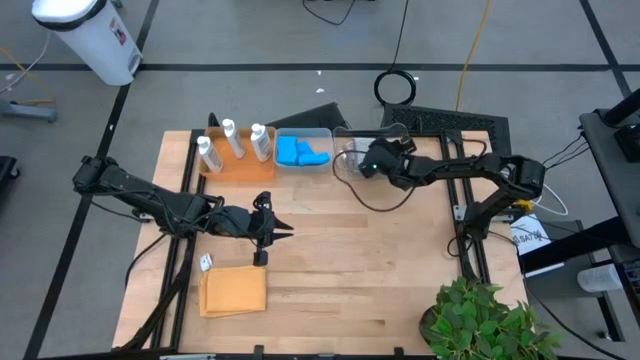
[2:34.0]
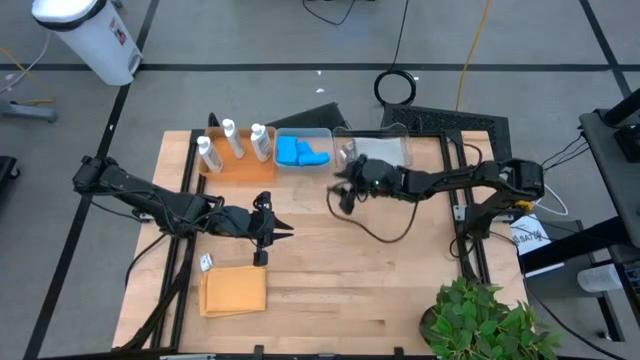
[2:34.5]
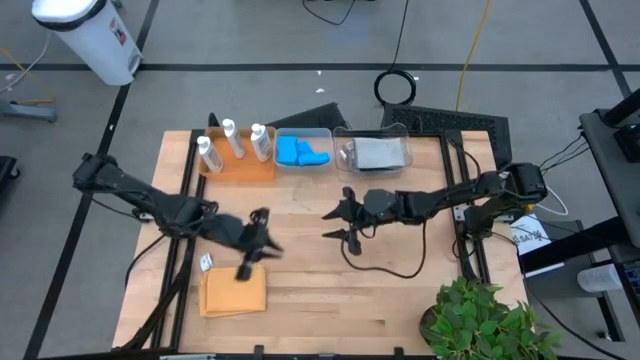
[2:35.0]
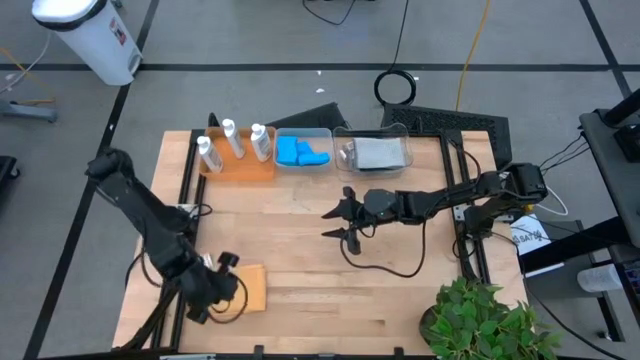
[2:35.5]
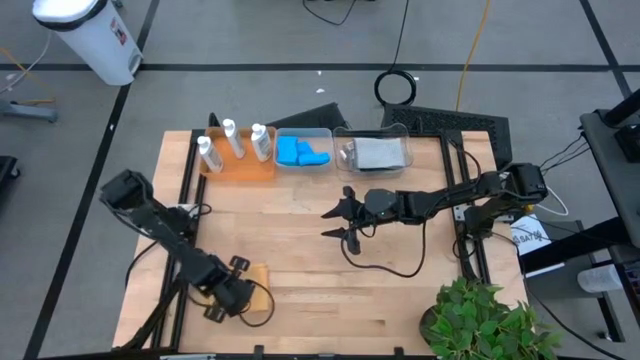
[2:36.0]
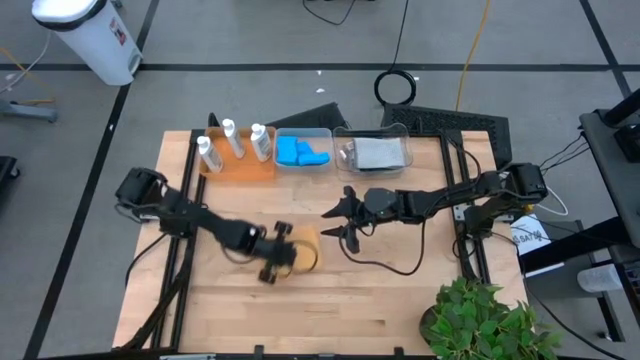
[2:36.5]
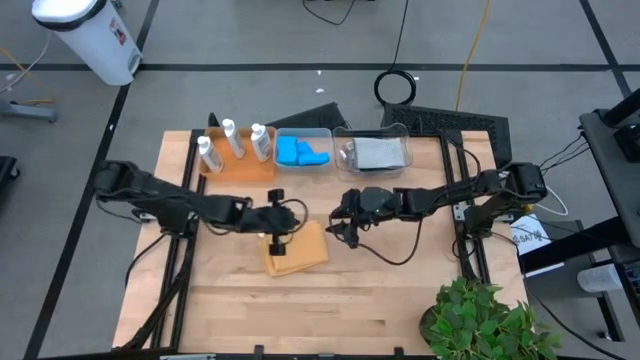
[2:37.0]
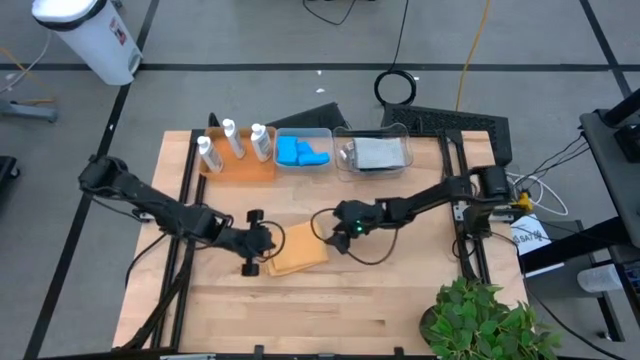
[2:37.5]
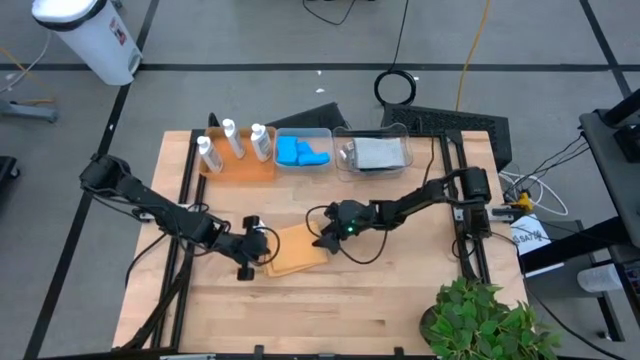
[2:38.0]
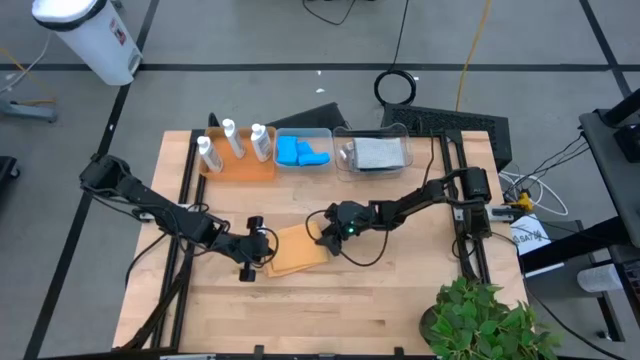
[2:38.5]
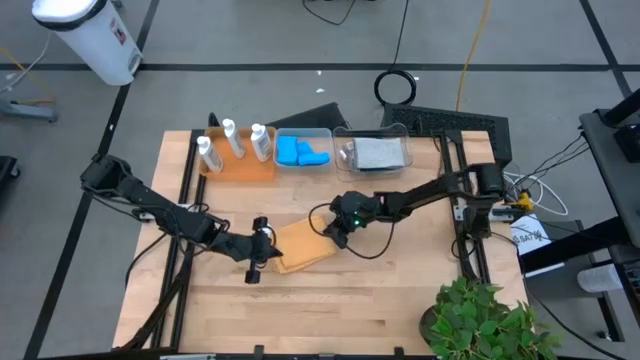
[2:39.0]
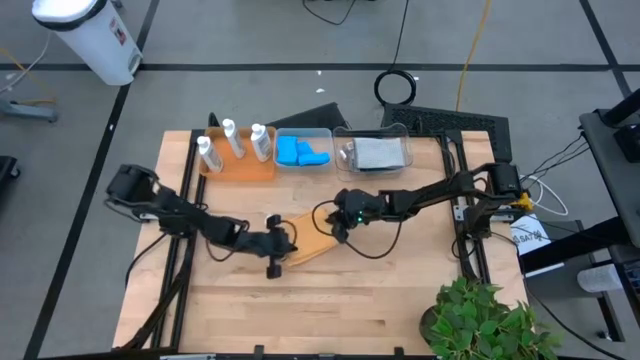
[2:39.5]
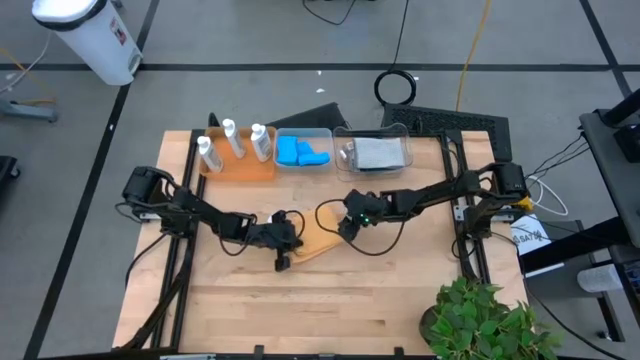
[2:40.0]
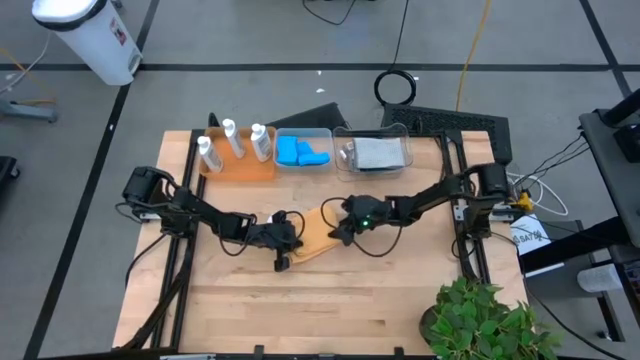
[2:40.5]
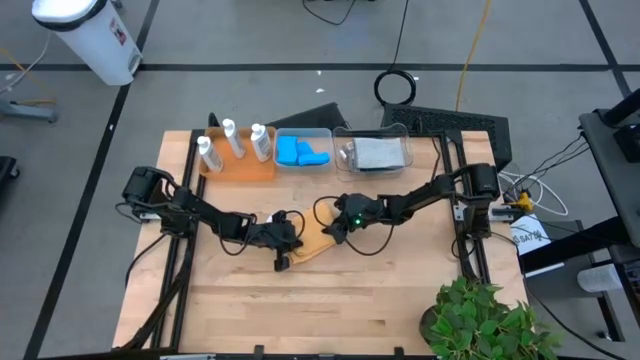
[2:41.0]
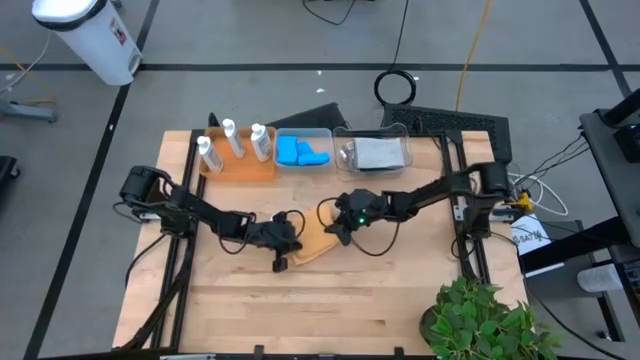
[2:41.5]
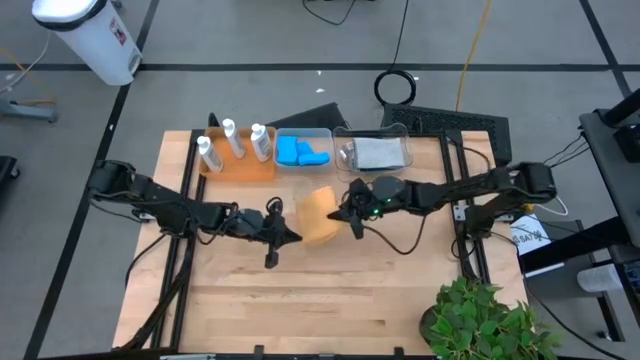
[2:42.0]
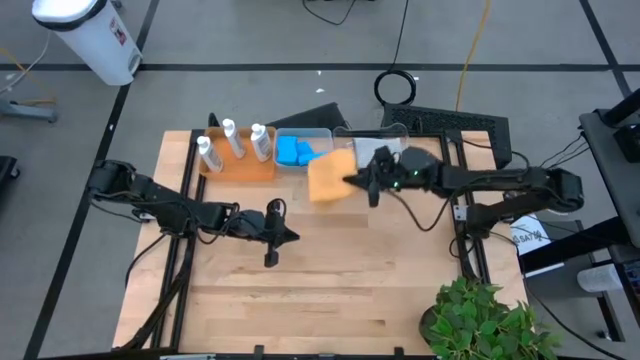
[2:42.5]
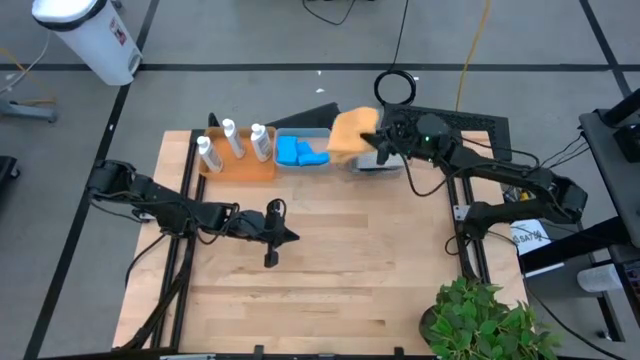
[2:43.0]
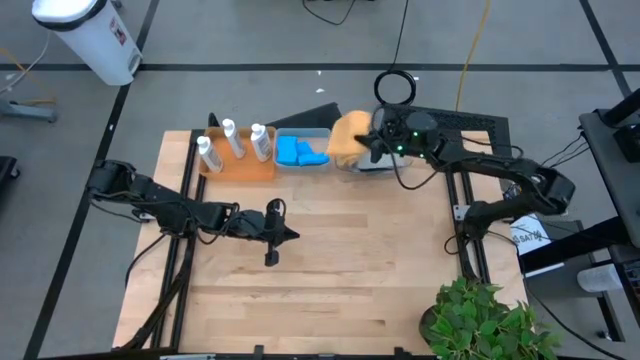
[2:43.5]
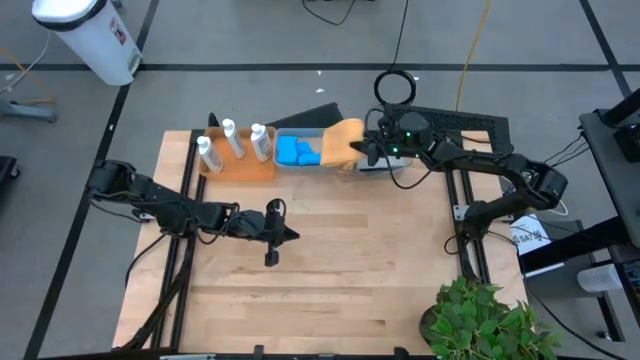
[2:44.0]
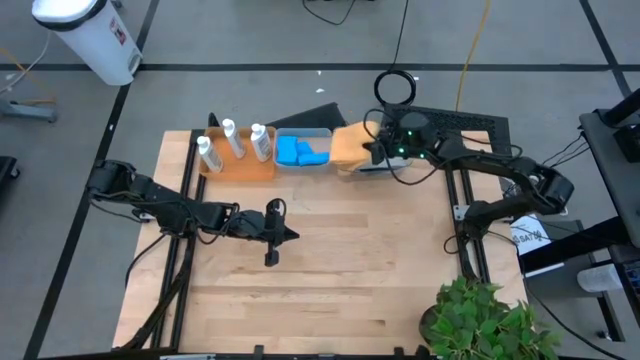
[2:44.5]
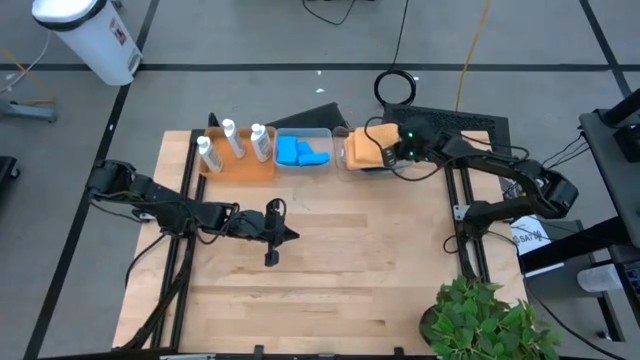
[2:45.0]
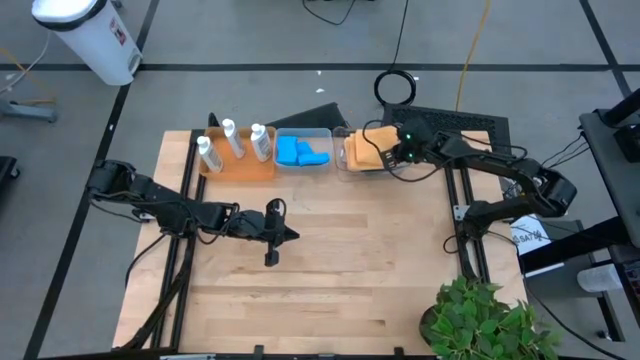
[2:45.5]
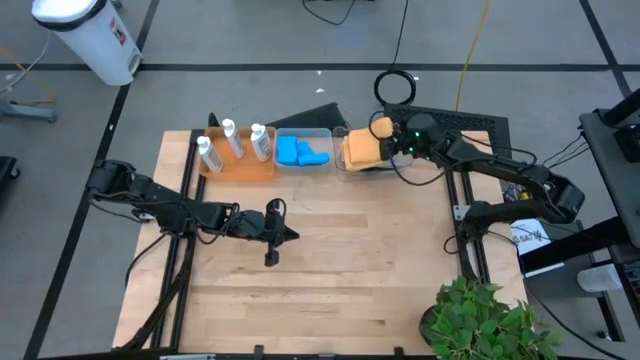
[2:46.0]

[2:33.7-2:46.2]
Task: Pick & Place Kitchen Items
Put the orange towel into the right transparent bin

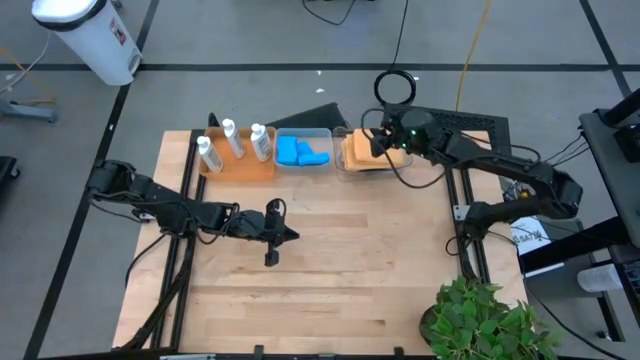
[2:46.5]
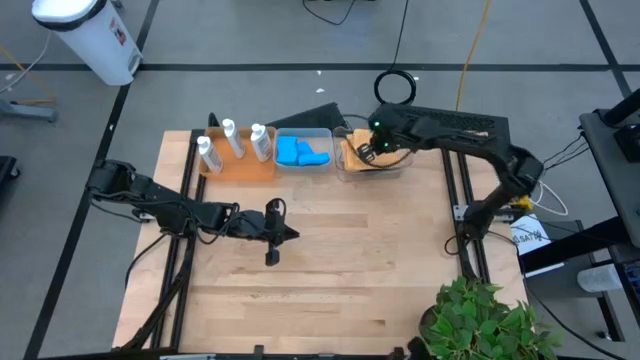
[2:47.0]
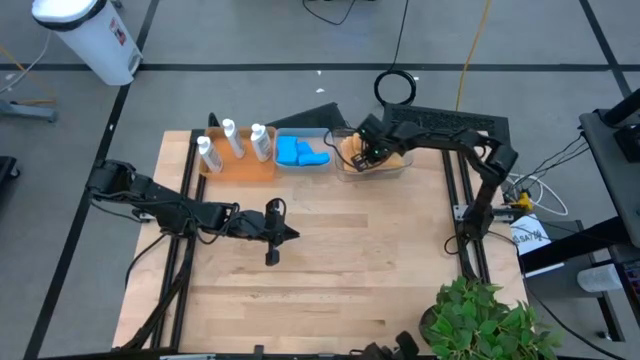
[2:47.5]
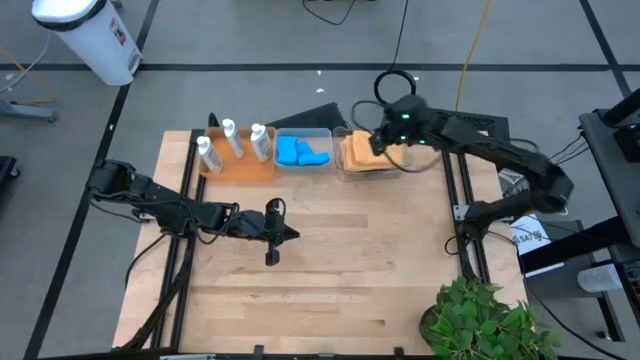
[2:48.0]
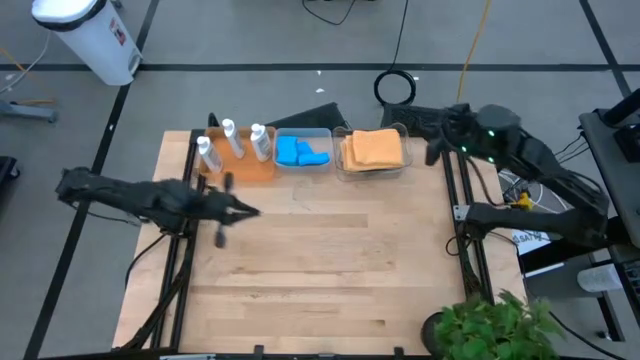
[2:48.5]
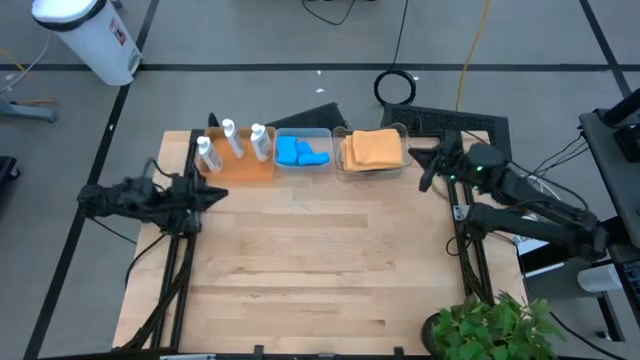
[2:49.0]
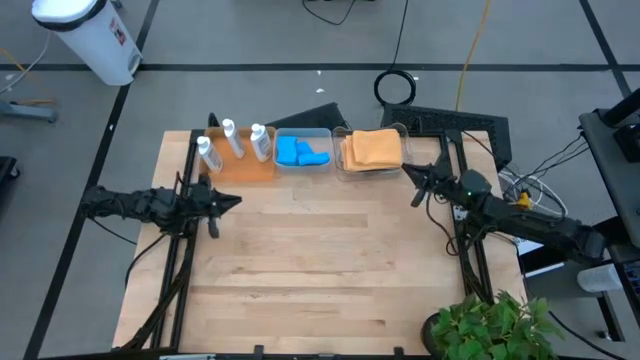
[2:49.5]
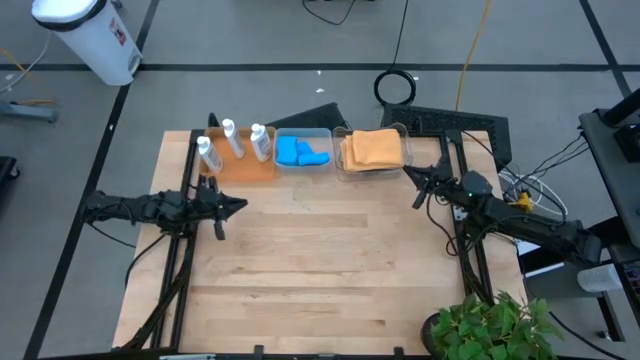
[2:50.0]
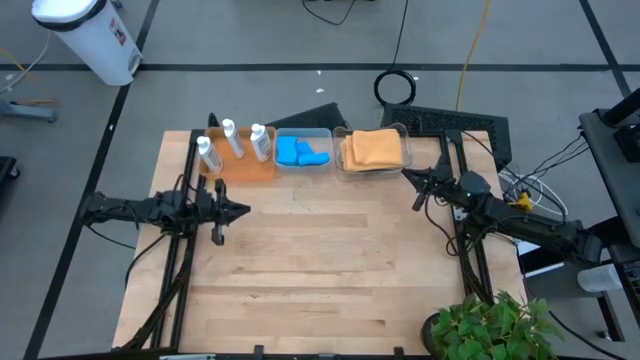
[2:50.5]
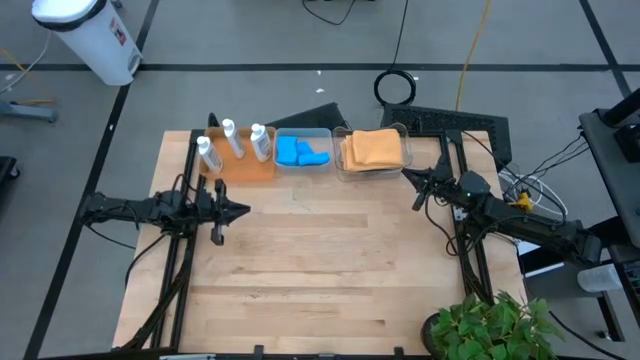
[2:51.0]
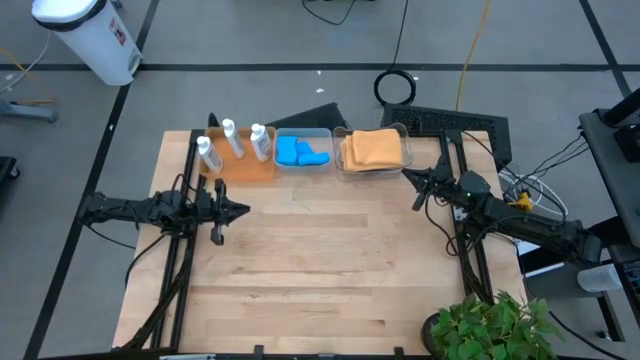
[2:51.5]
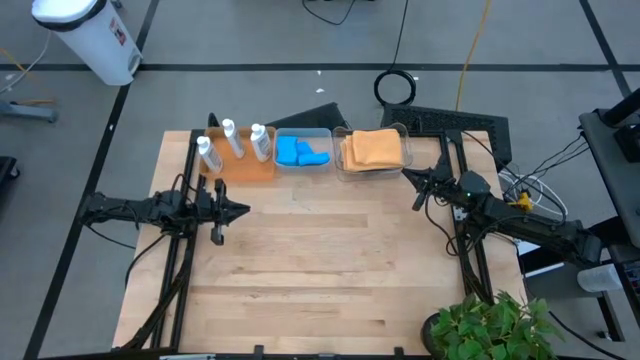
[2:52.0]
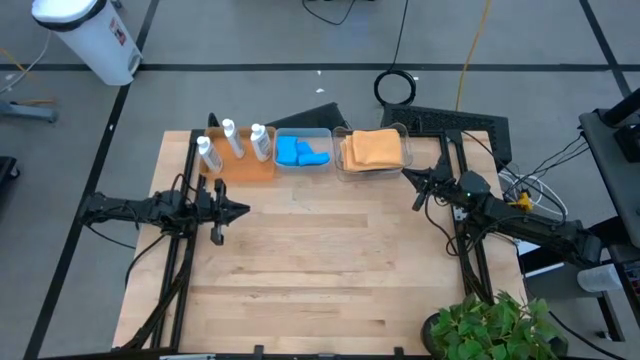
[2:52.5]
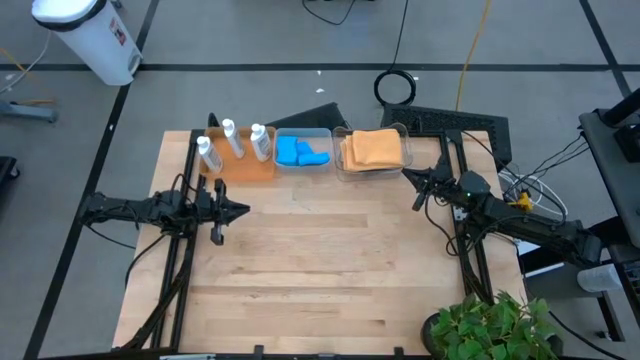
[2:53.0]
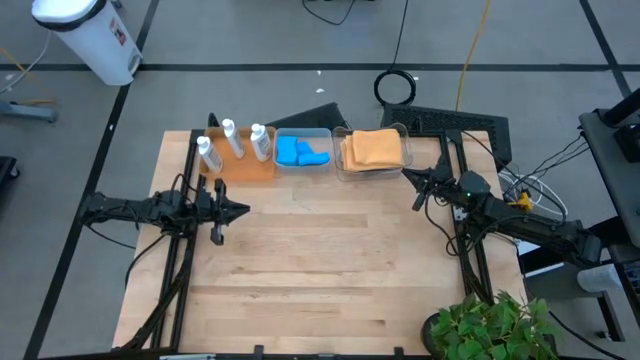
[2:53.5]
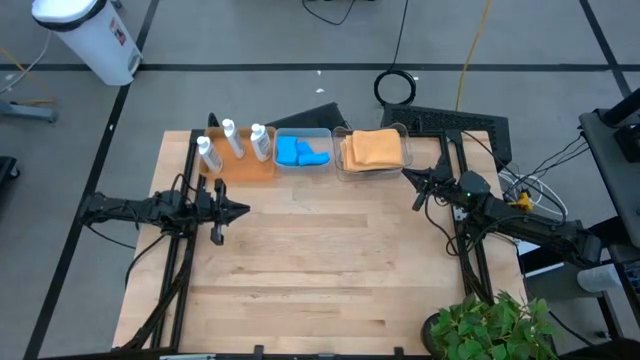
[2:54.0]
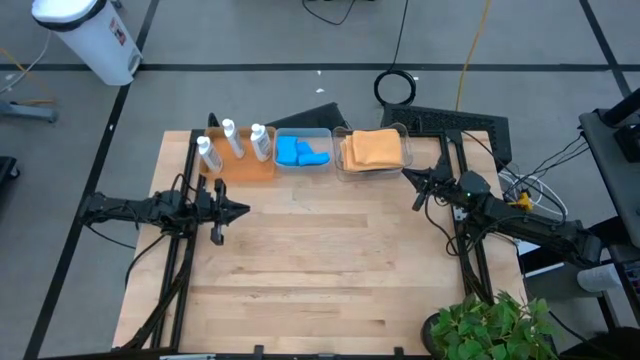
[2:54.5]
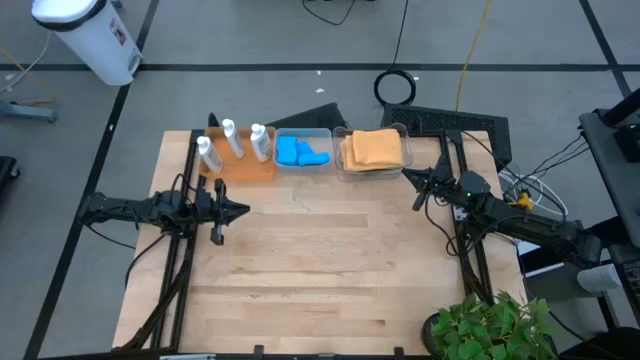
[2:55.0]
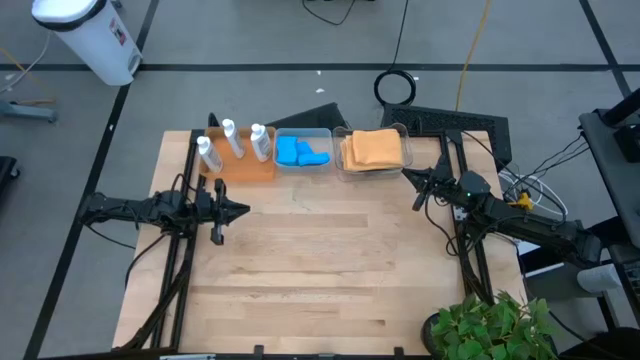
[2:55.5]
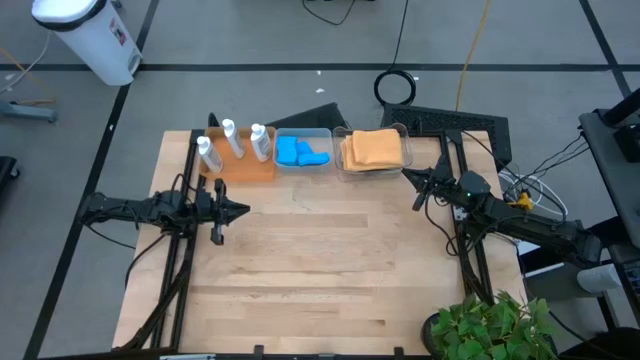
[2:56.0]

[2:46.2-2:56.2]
Return to Home Position
